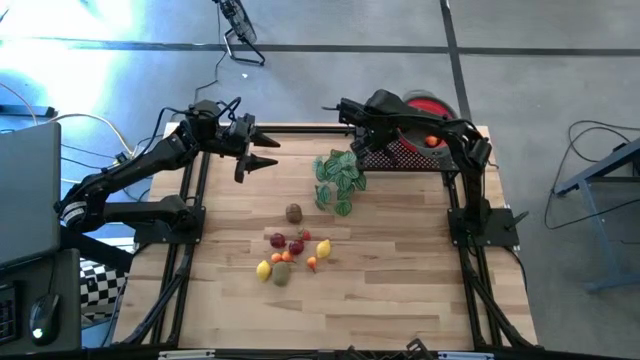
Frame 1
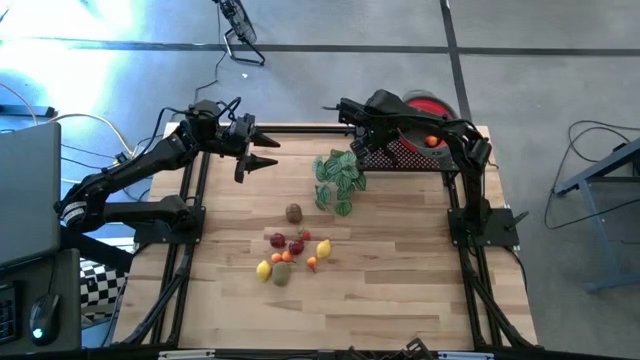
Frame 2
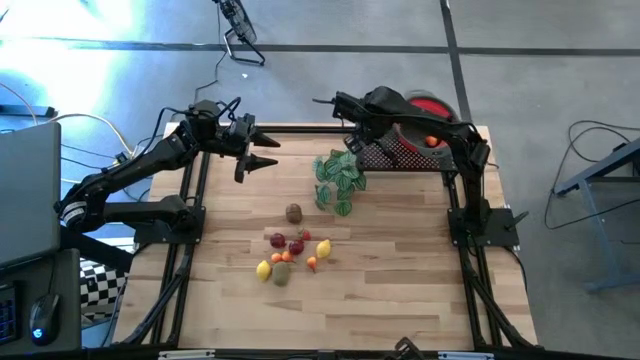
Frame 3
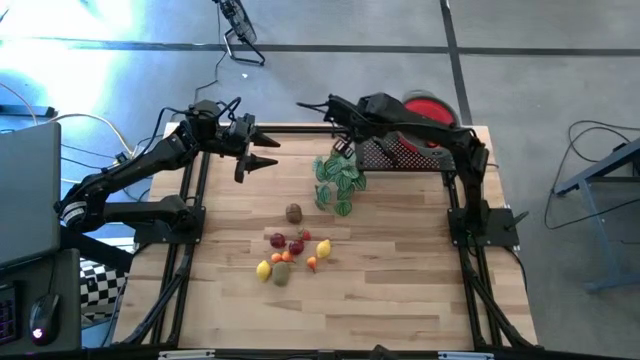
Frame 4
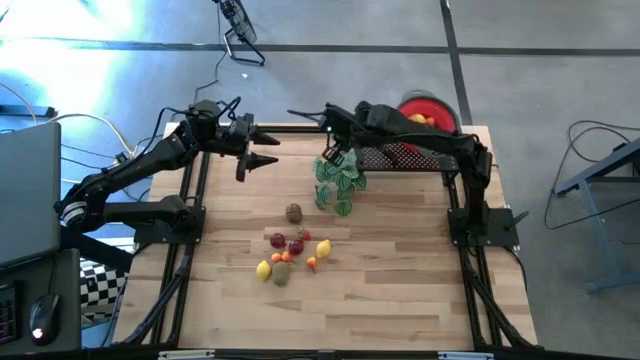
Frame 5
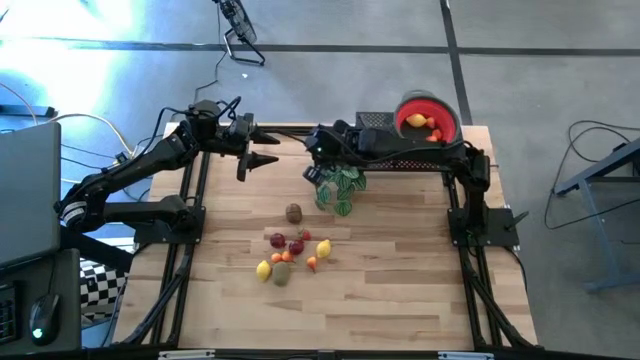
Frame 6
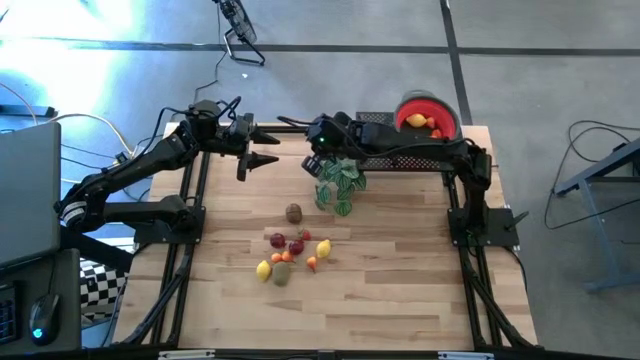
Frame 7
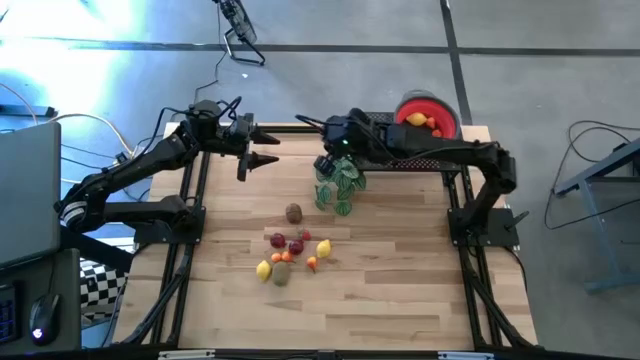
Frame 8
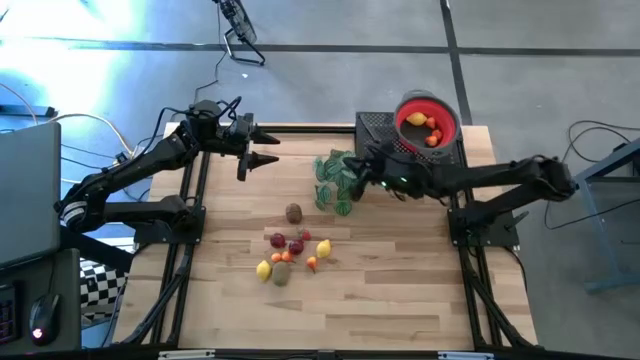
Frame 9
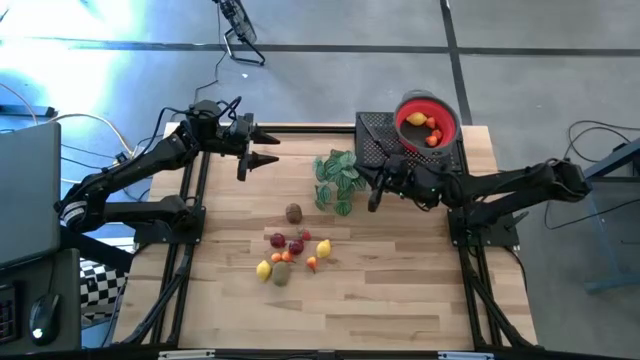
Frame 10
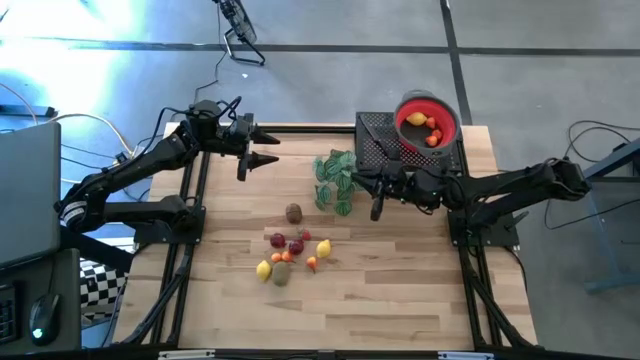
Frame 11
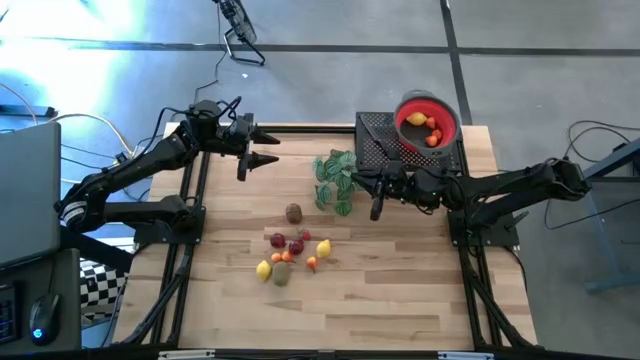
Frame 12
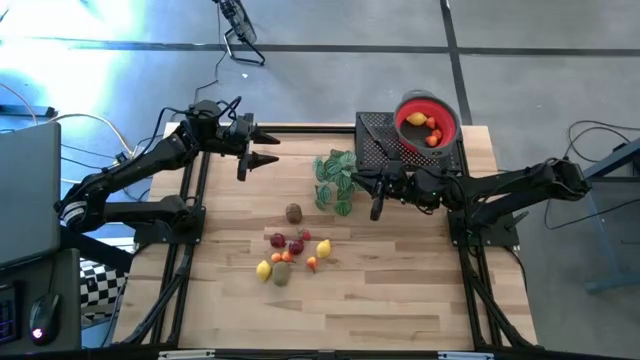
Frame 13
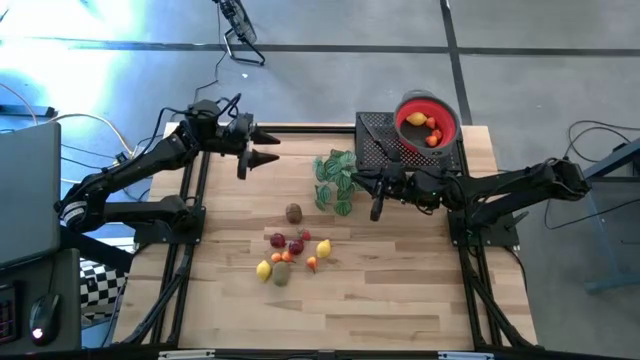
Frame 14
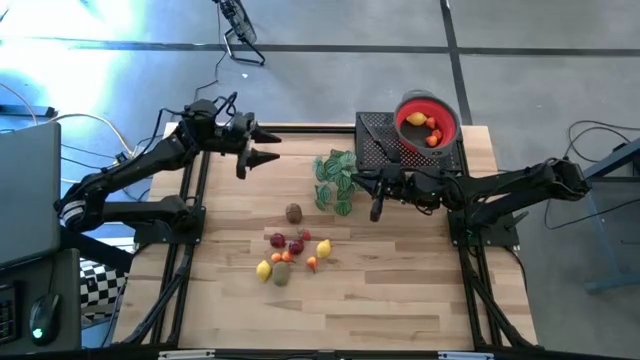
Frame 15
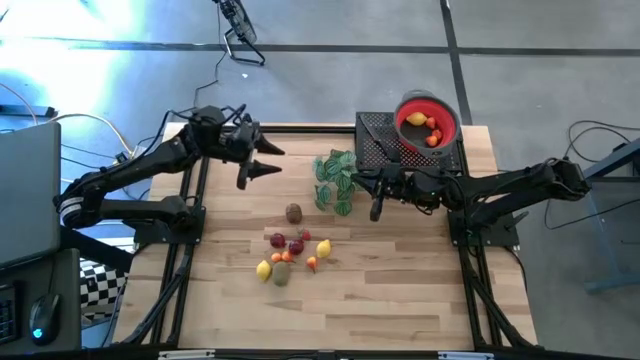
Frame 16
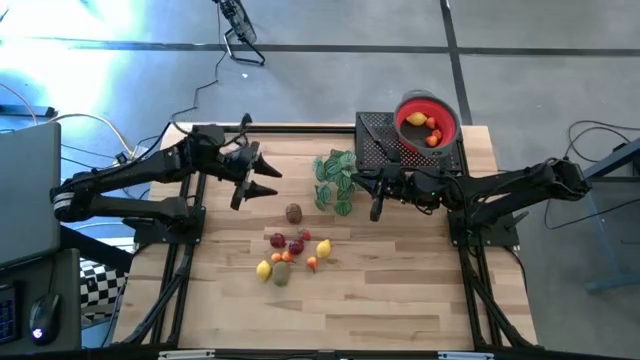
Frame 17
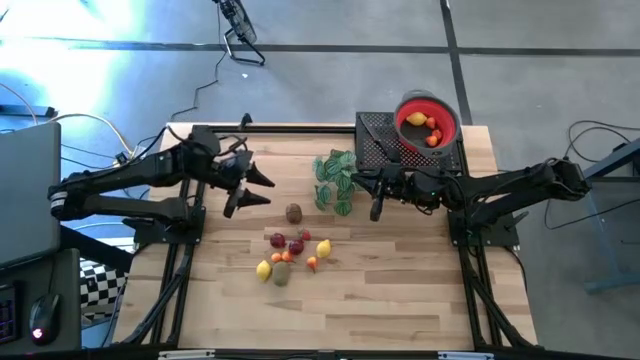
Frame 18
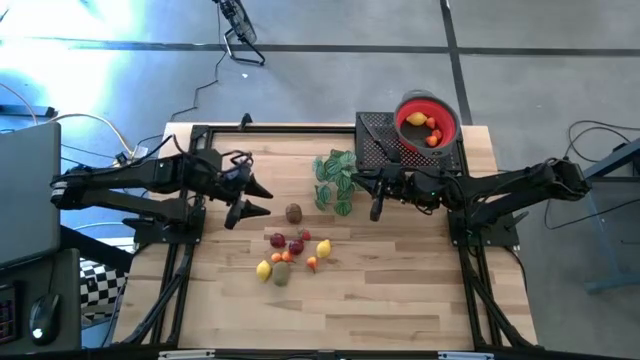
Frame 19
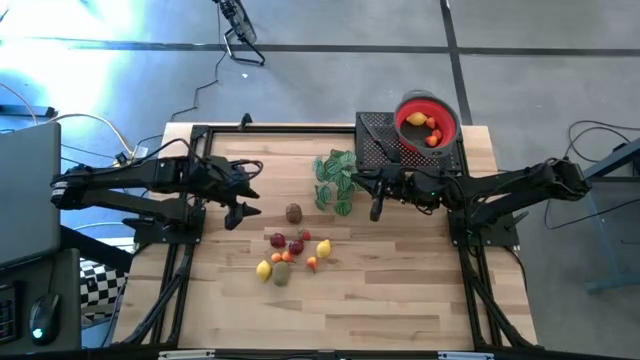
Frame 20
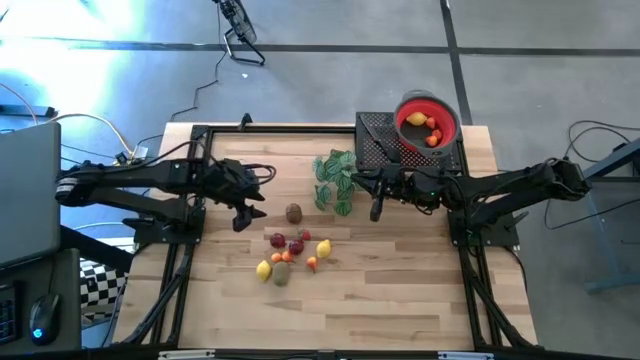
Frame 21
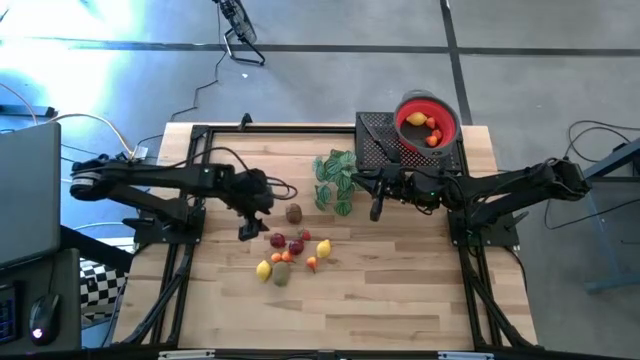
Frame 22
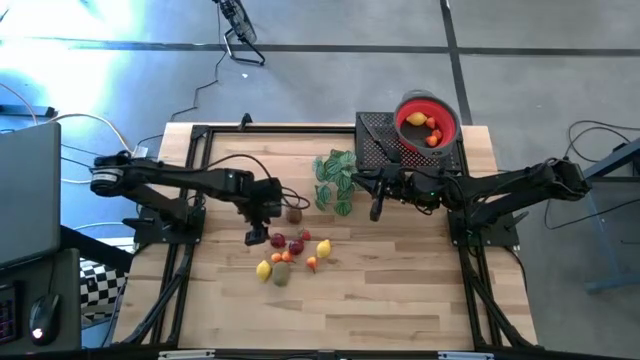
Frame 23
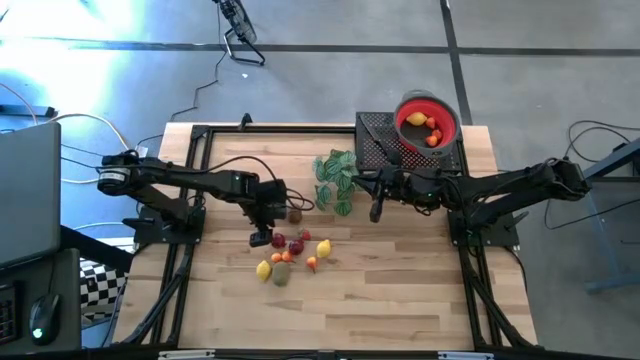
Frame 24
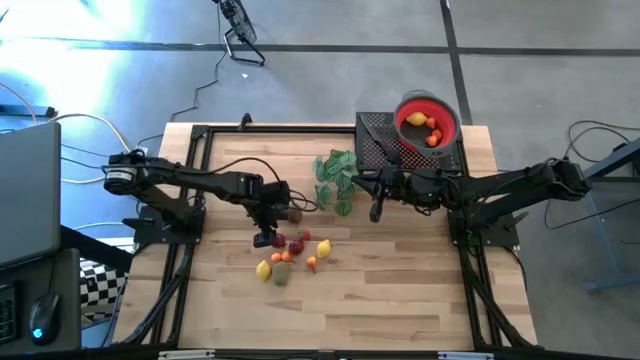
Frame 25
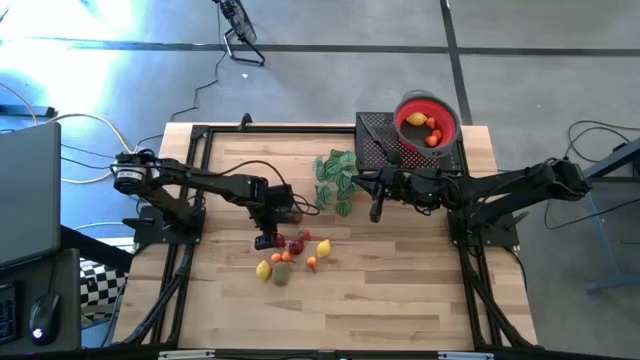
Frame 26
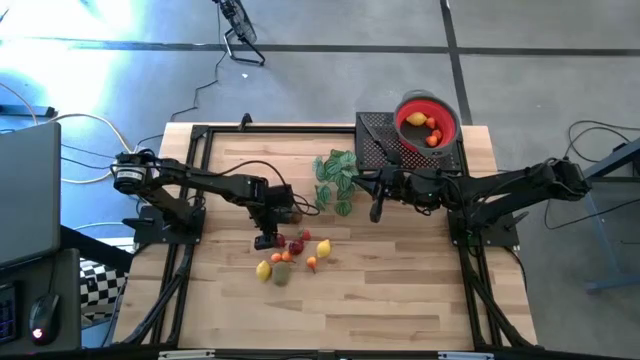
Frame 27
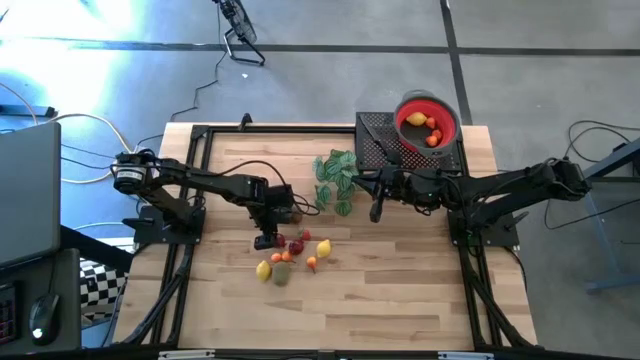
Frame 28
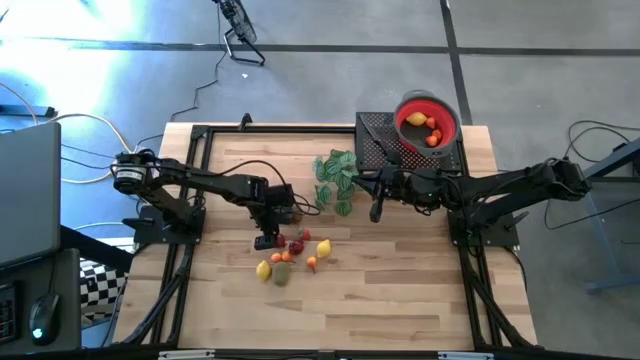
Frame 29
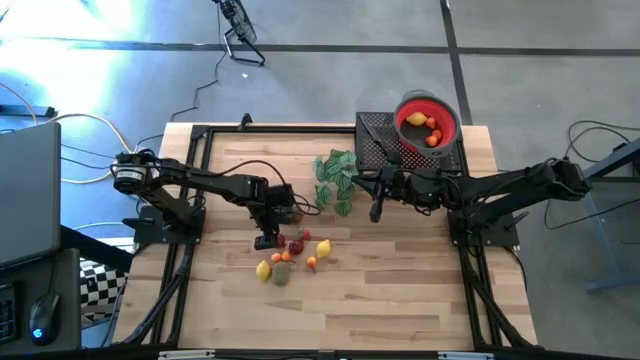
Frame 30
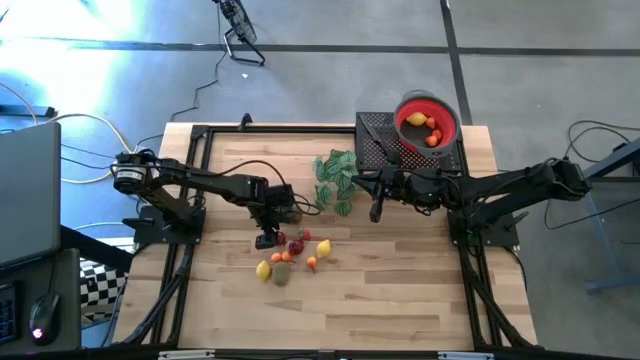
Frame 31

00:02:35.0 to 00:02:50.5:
Task: Pick & Place Fruit
Put the pomegranate into the red colander

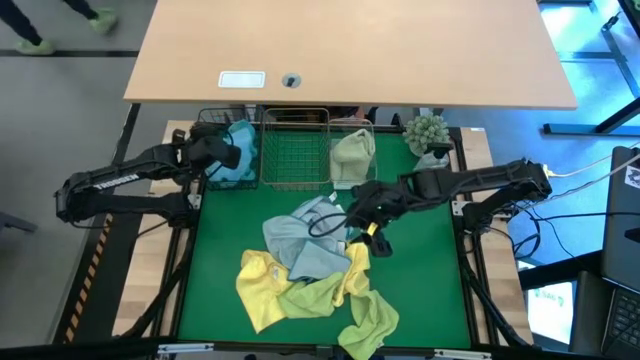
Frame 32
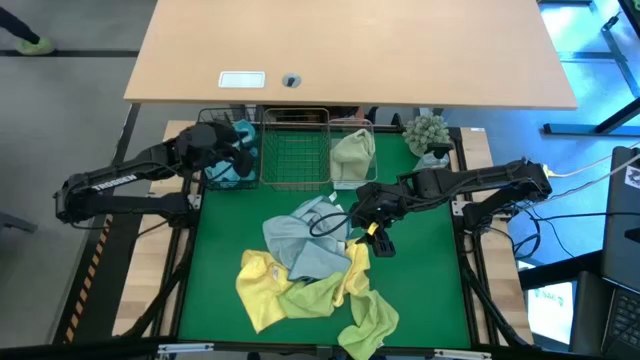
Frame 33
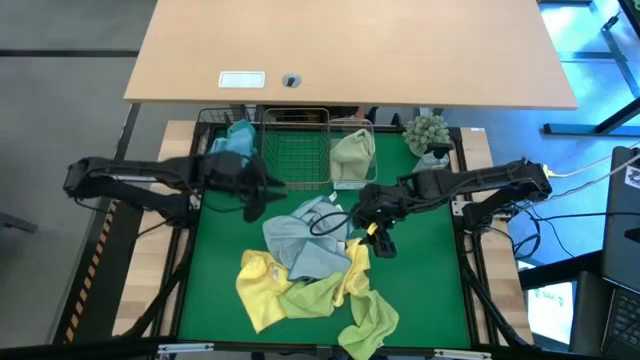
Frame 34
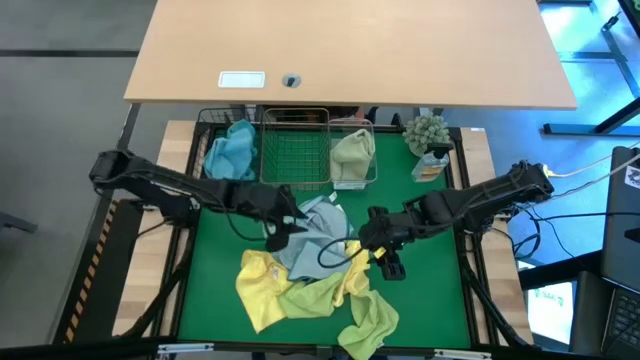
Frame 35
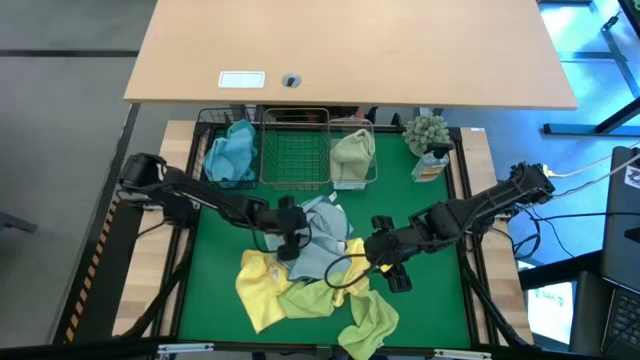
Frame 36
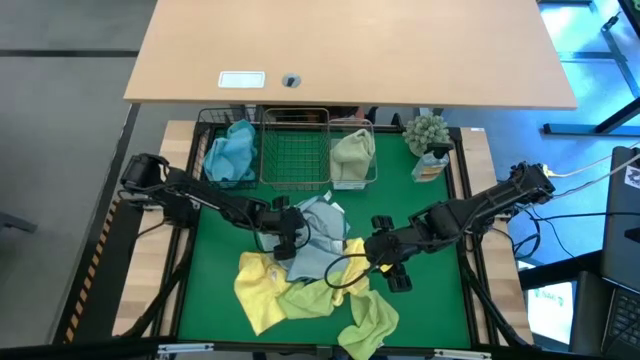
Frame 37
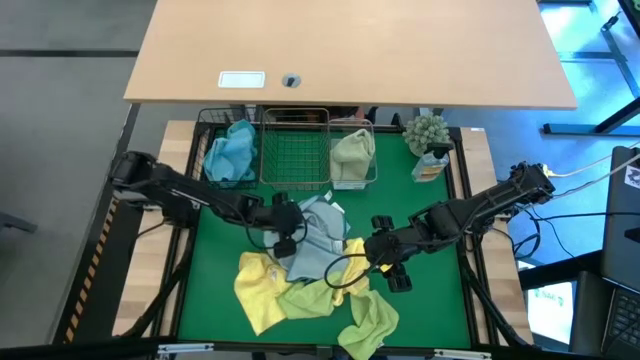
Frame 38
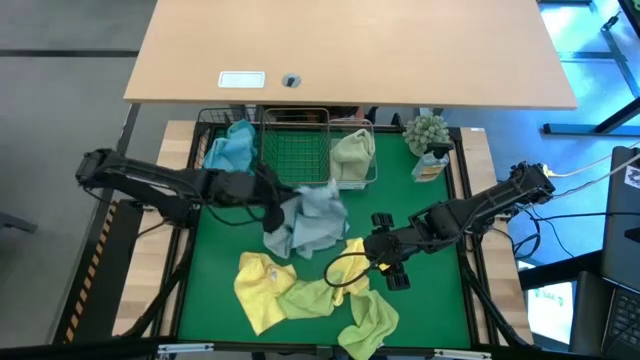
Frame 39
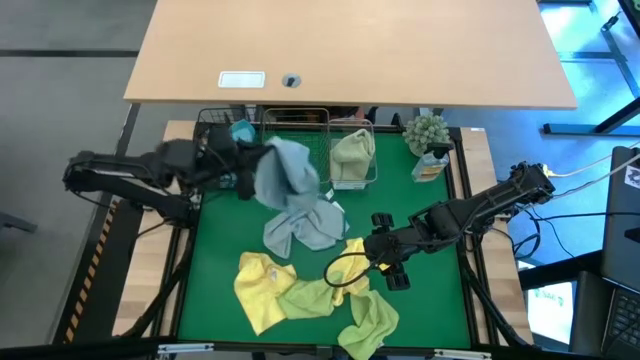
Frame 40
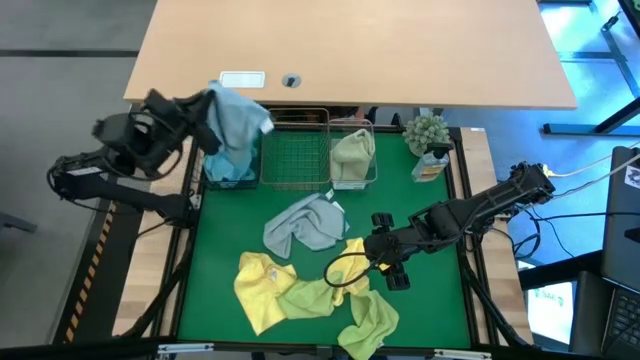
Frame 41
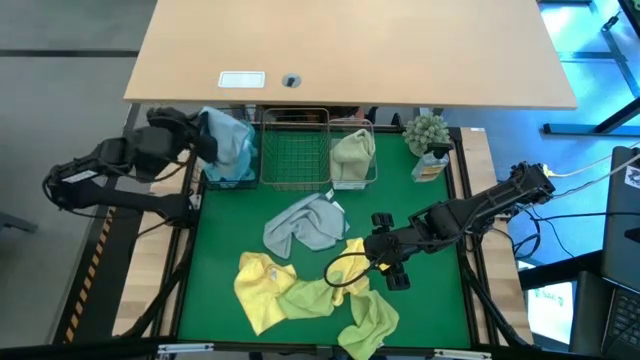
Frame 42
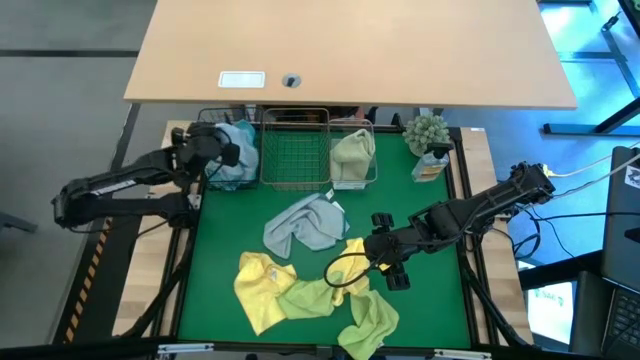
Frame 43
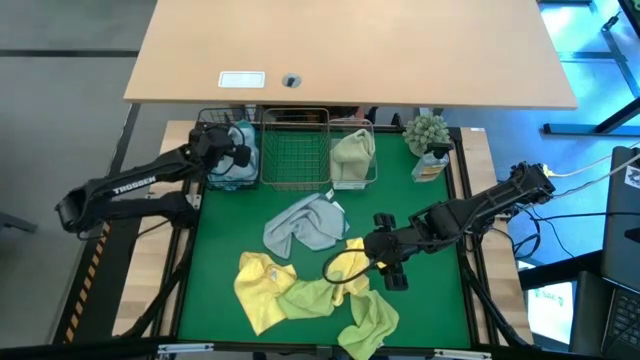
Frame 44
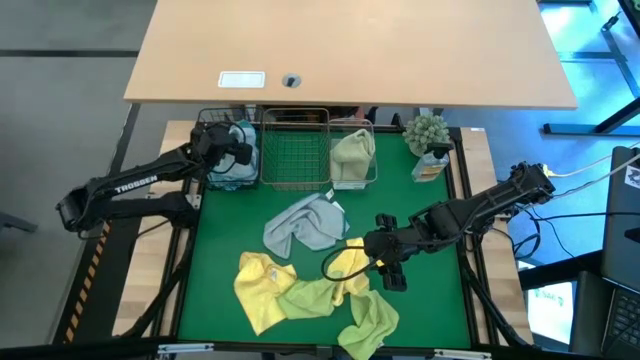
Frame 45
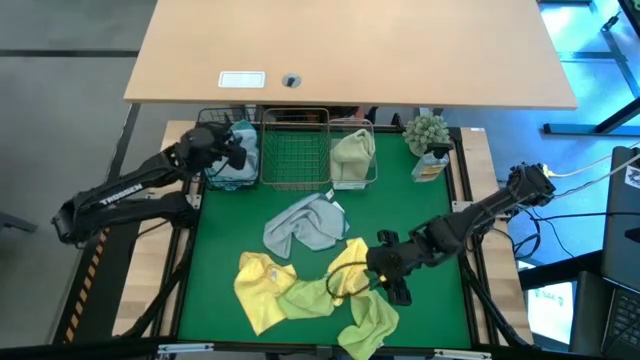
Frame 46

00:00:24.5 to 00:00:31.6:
Task: Sort microfiber towel by color & place in baskets
Put the light blue microfiber cloth into the black wire basket
